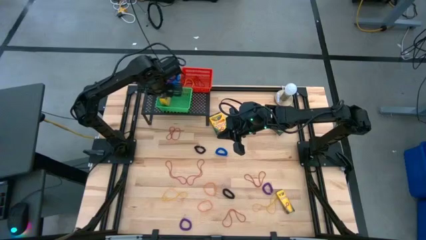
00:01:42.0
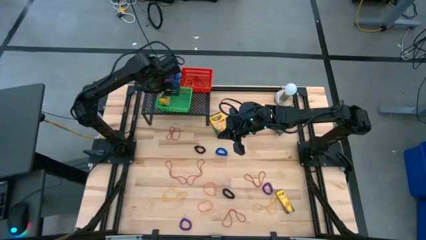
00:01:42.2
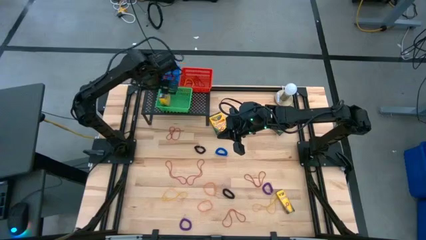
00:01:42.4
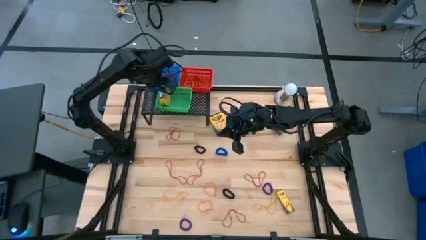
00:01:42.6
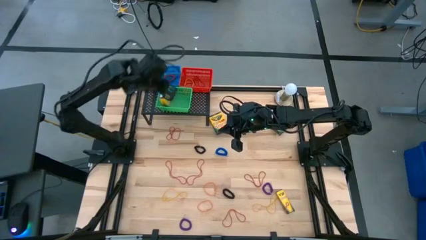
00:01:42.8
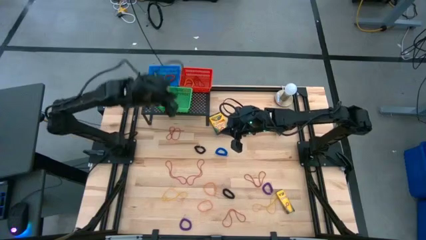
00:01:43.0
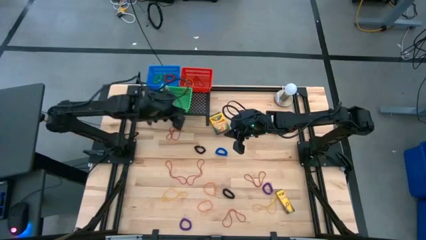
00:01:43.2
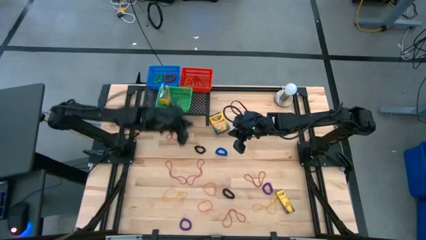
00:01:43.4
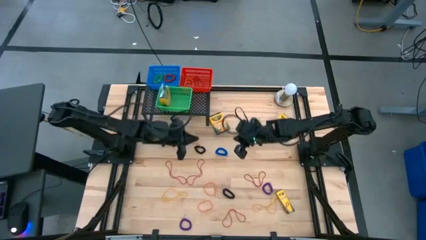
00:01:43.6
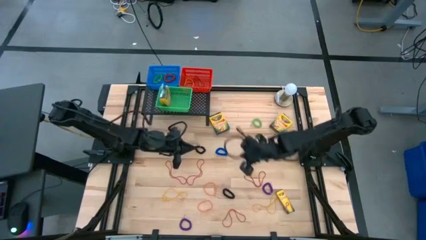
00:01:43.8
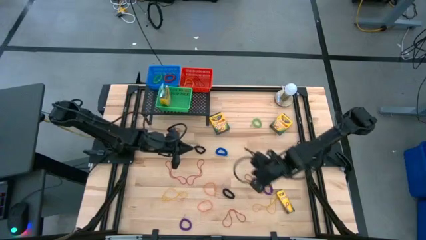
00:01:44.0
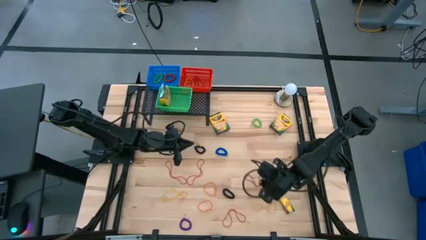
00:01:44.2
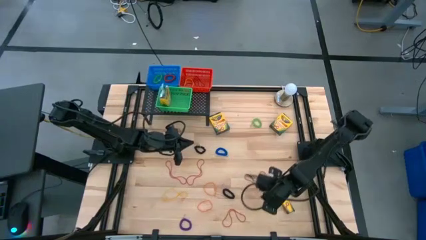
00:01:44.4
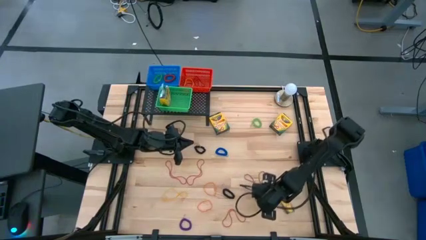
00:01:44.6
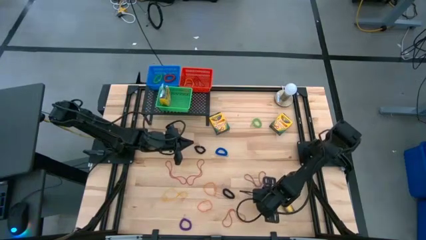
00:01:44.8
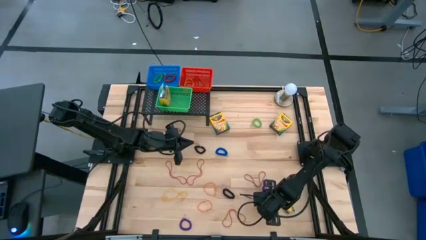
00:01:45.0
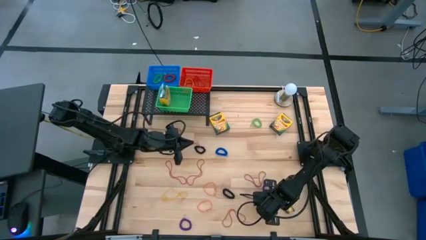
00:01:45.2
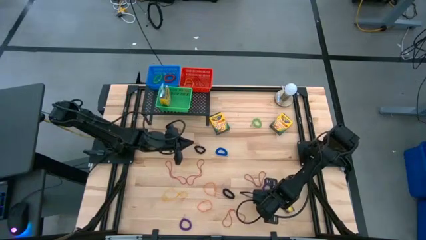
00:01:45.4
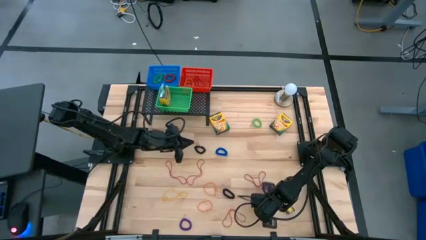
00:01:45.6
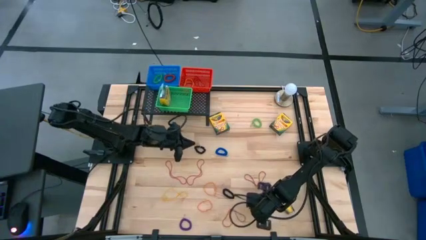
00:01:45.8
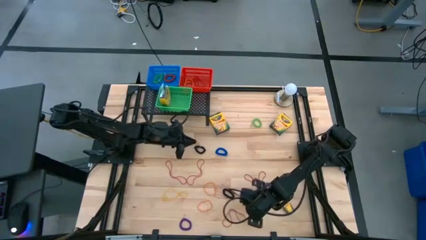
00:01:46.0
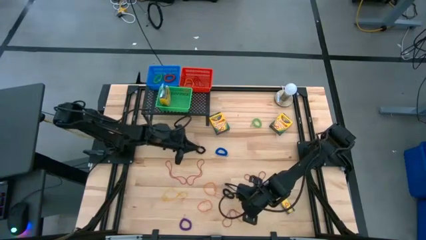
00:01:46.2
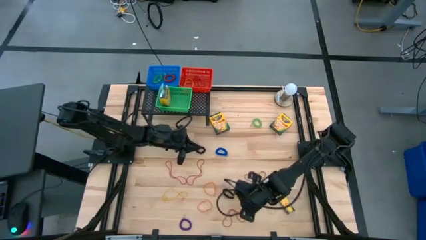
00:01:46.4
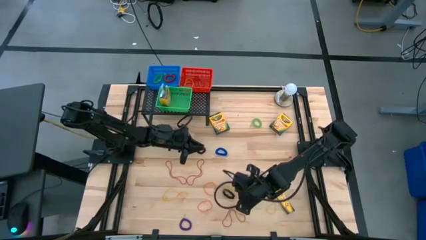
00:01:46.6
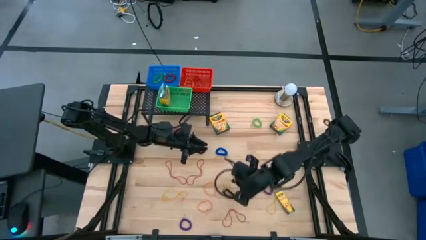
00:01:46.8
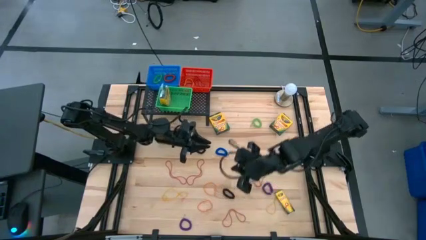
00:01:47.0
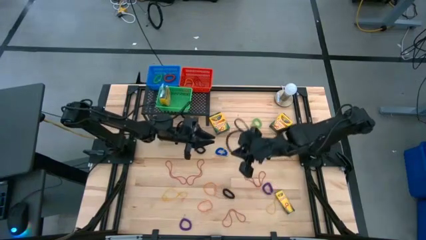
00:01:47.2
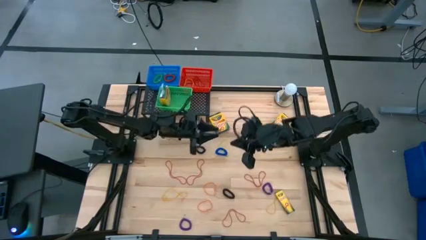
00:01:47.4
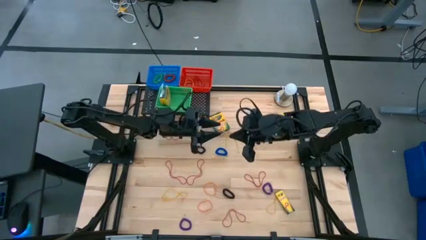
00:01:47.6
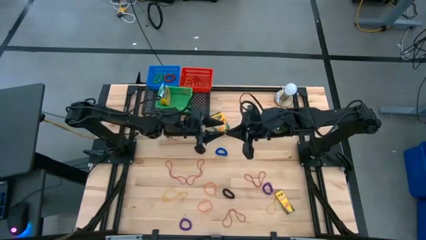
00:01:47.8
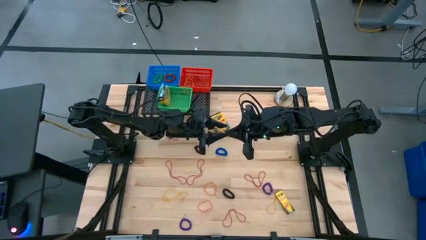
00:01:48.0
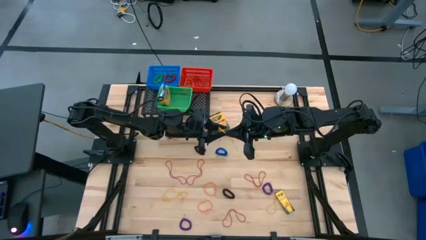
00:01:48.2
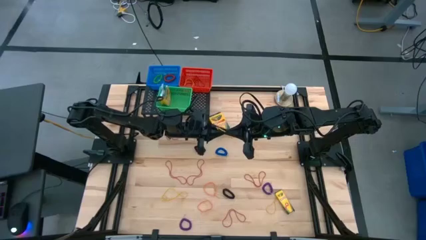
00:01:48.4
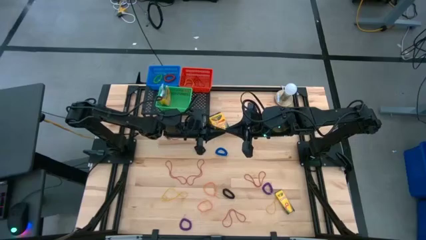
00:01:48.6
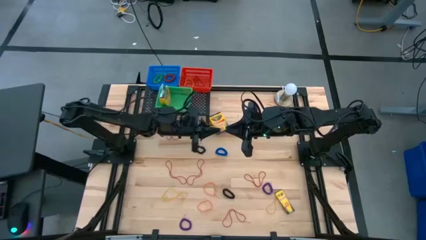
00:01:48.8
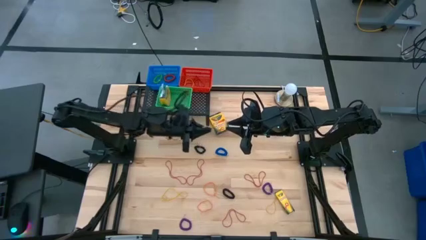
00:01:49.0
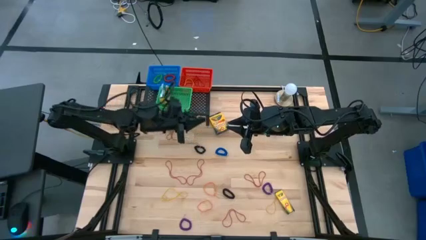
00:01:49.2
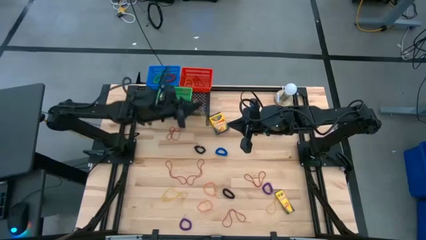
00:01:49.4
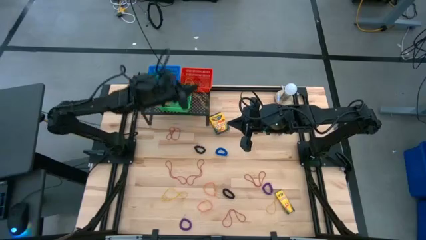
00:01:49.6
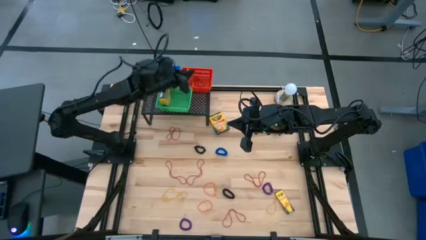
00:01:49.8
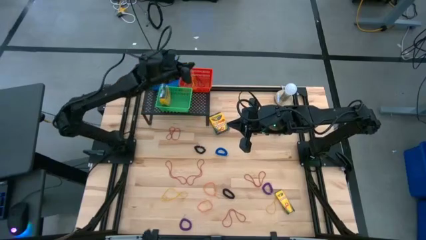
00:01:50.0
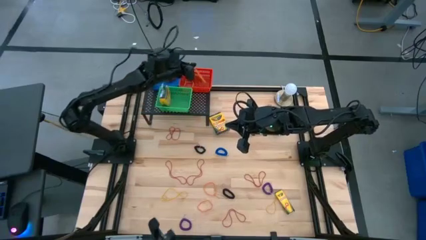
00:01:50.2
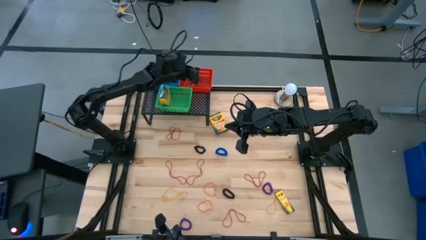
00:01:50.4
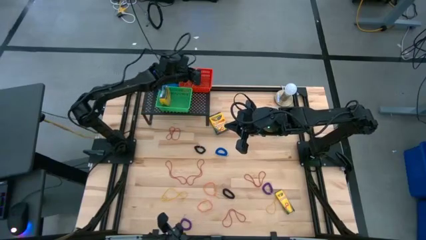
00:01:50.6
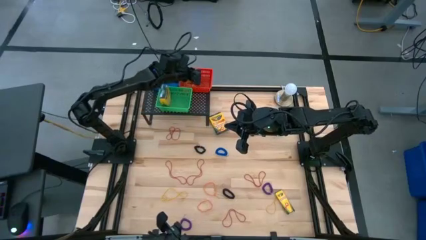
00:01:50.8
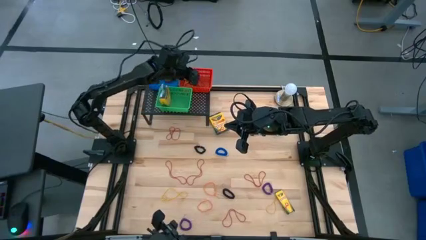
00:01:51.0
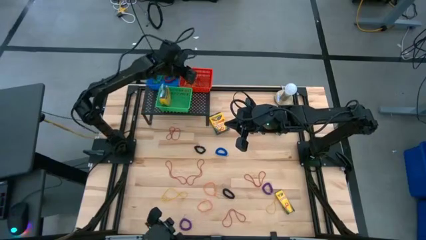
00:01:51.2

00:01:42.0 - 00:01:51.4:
Task: Pick & Place Office Desk Supplies
Put the yellow rubber band into the red bin

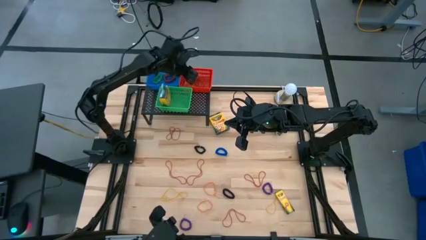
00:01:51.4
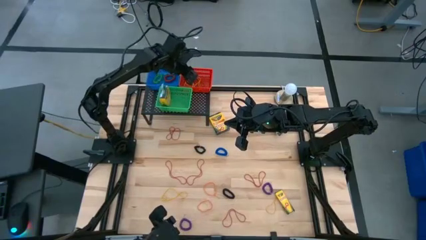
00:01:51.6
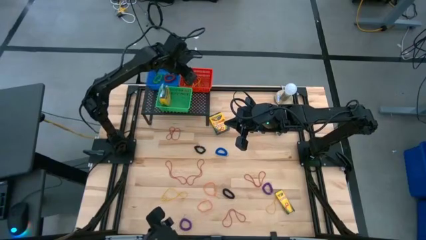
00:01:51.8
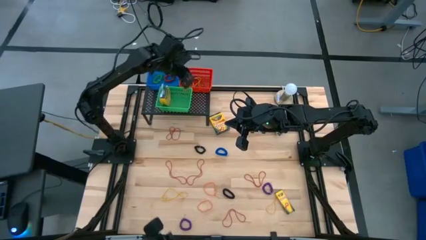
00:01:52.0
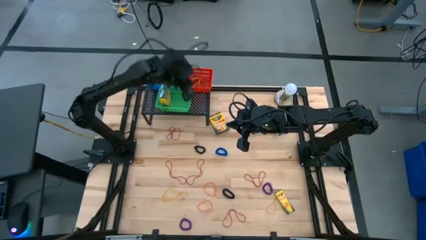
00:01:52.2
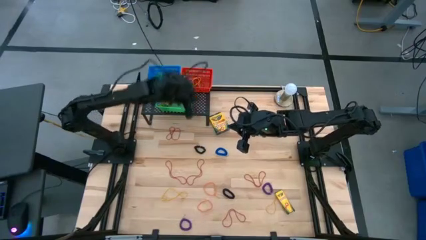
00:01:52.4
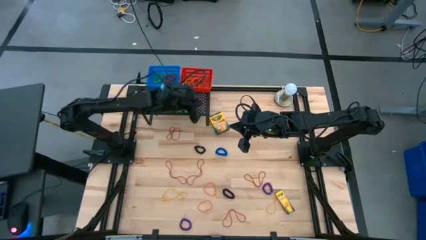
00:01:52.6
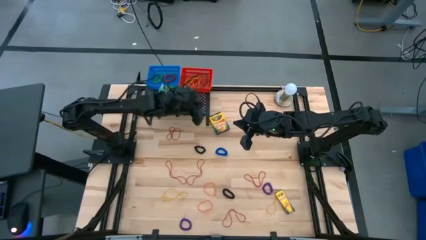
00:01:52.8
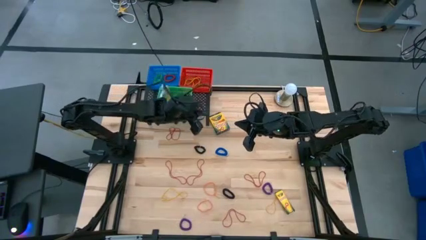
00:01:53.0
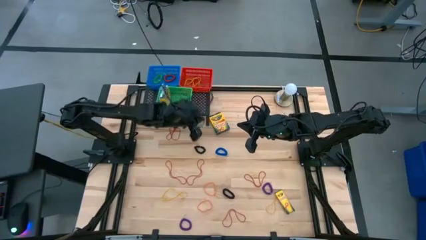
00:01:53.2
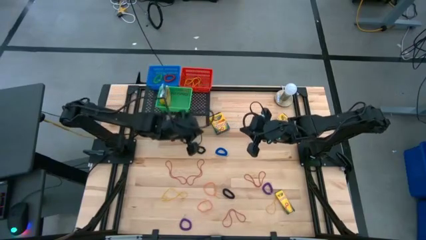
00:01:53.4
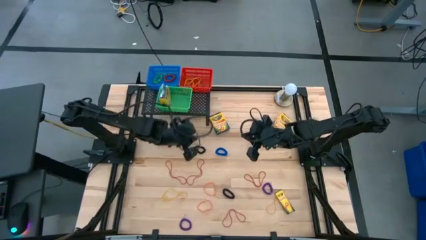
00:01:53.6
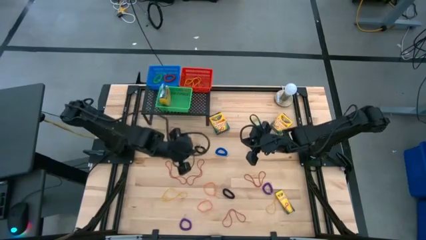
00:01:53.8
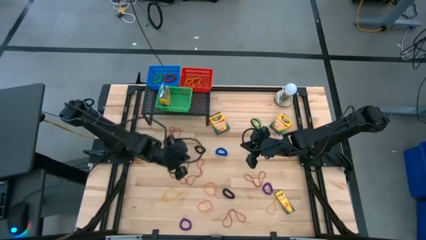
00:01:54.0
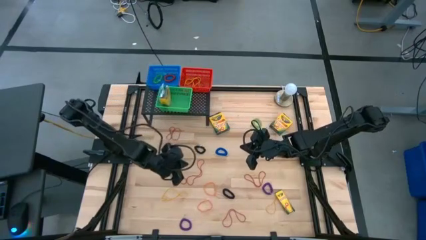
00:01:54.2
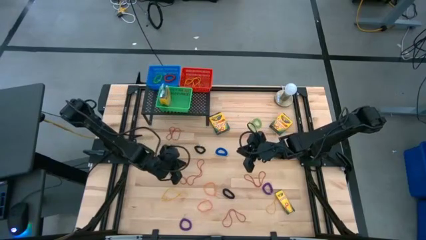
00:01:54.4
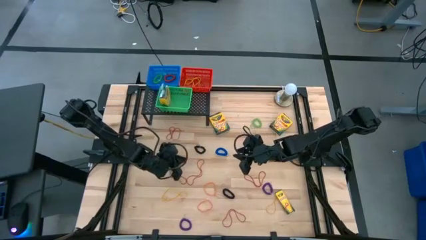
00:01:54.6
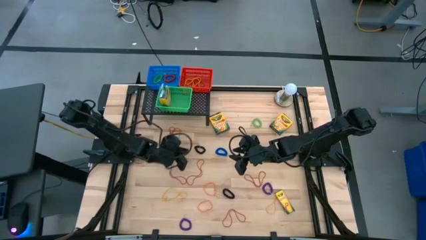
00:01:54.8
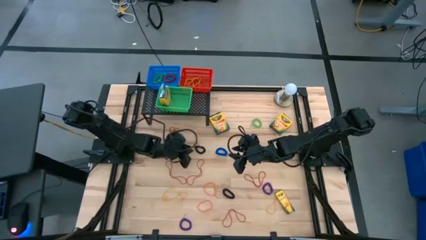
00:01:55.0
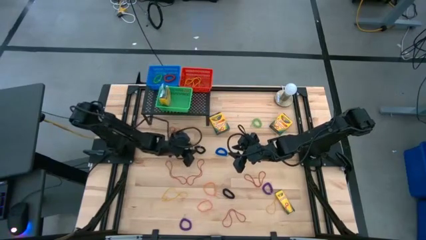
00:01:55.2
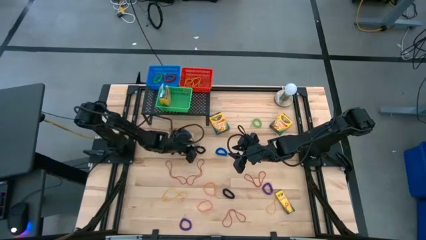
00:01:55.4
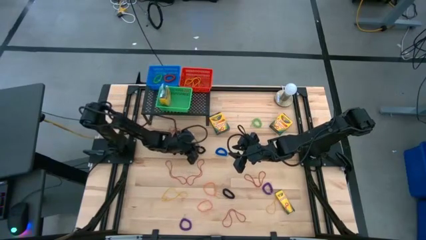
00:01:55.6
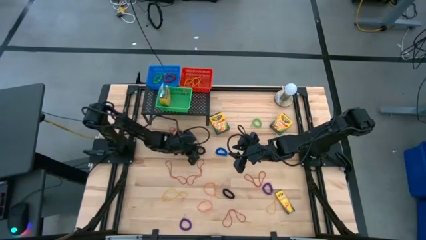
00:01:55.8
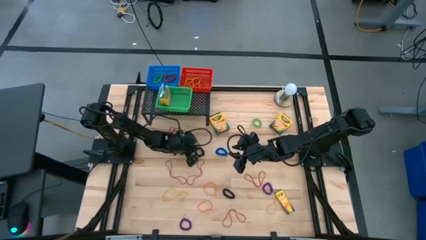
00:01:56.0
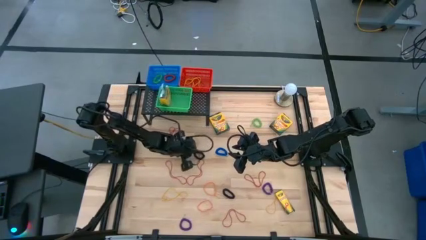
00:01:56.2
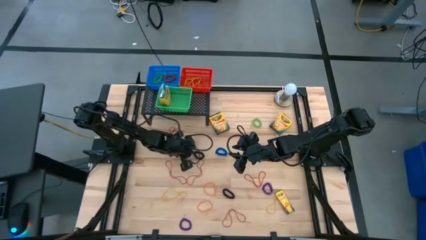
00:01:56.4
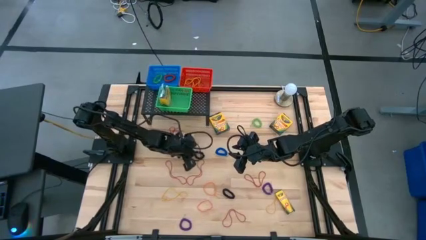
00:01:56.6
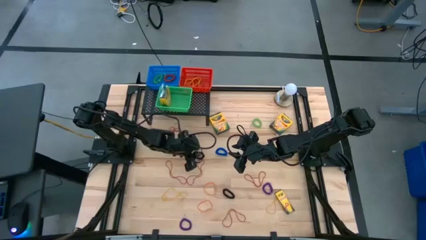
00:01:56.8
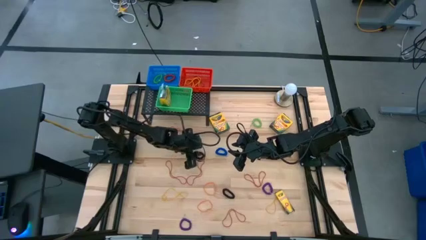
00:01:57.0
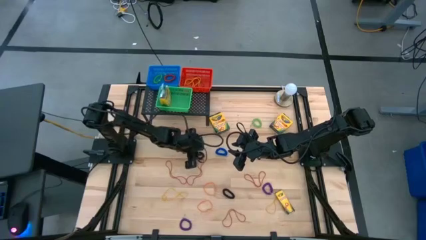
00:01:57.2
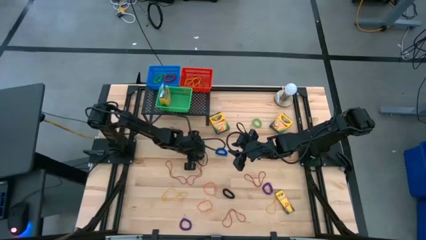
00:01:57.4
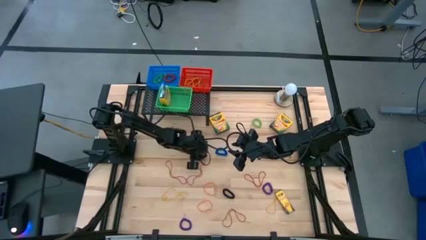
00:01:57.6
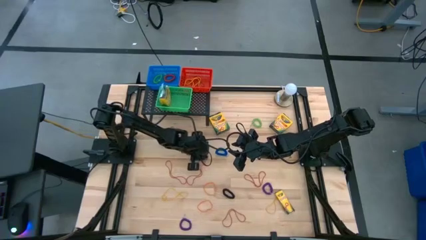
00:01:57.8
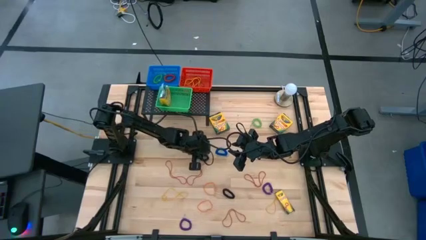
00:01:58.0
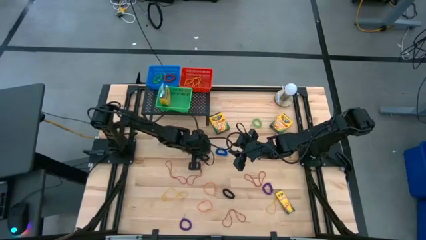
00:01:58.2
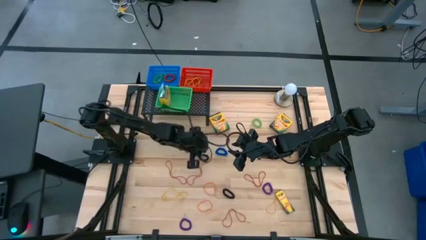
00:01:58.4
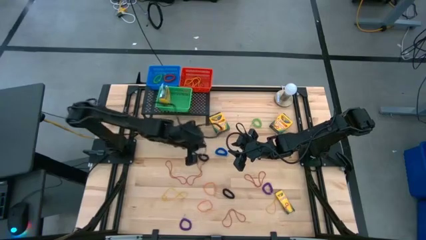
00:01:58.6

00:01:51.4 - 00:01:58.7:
Put the black spring keychain into the blue bin
